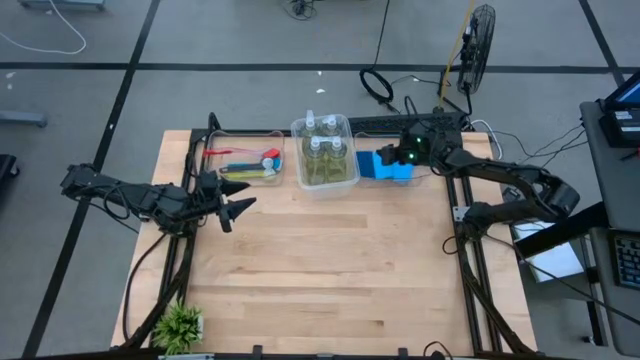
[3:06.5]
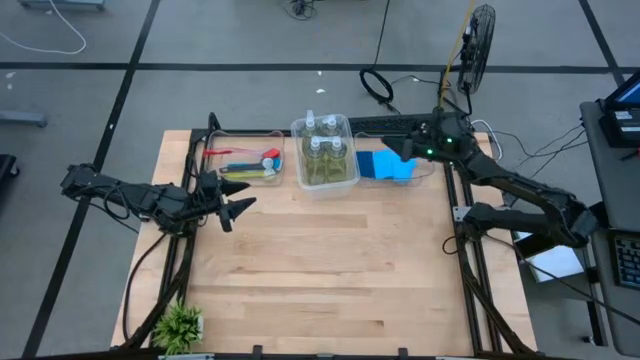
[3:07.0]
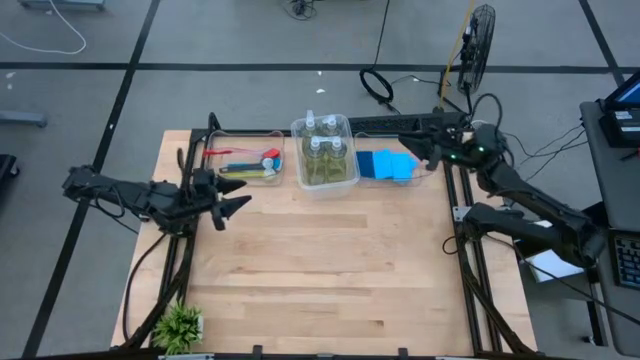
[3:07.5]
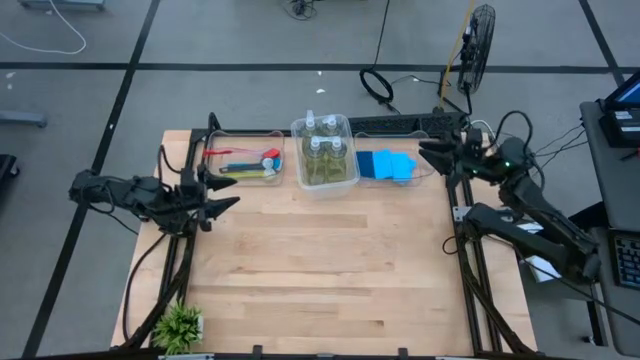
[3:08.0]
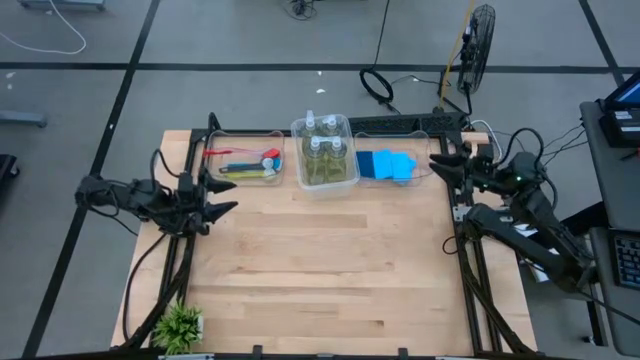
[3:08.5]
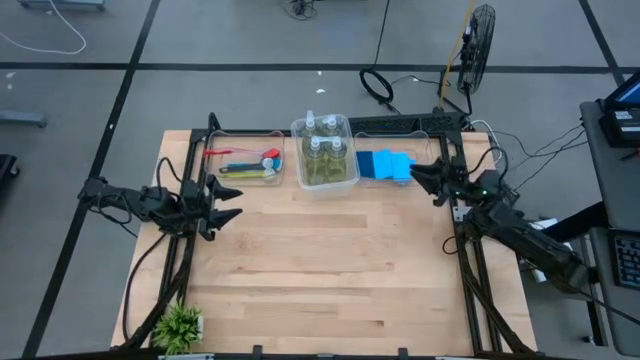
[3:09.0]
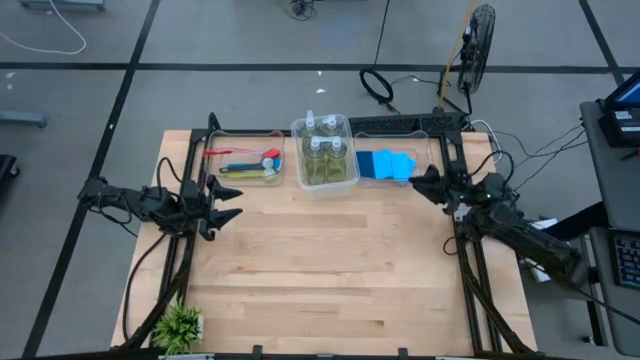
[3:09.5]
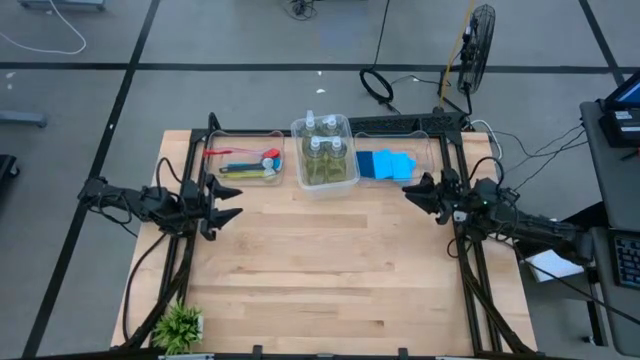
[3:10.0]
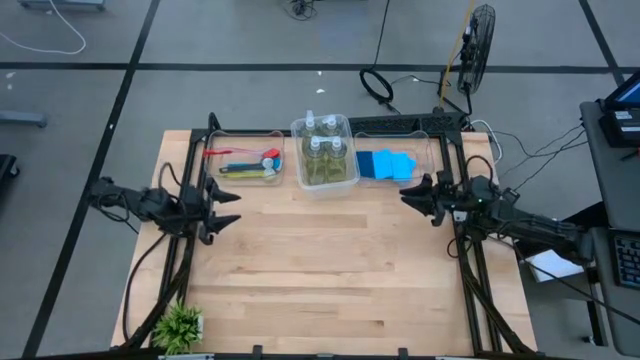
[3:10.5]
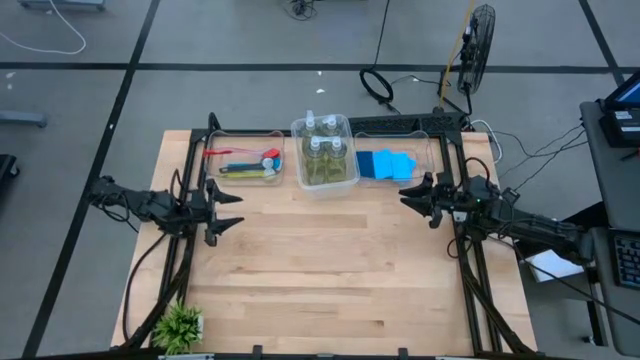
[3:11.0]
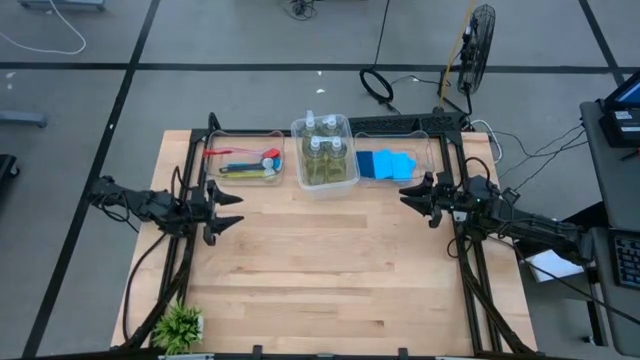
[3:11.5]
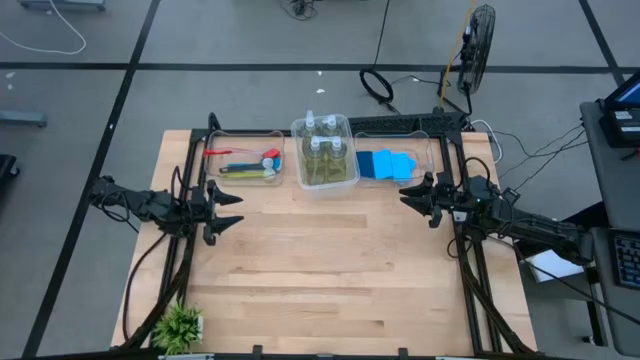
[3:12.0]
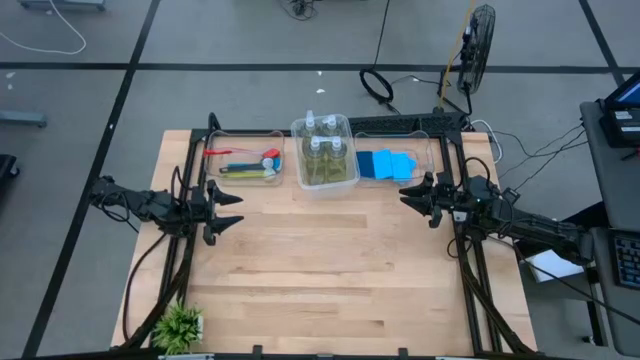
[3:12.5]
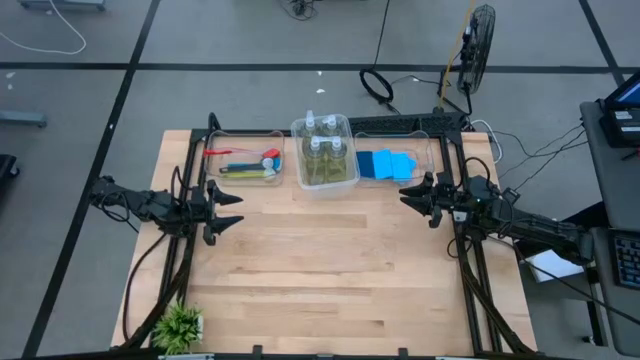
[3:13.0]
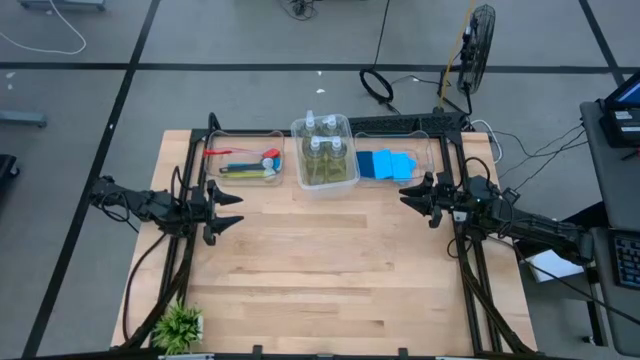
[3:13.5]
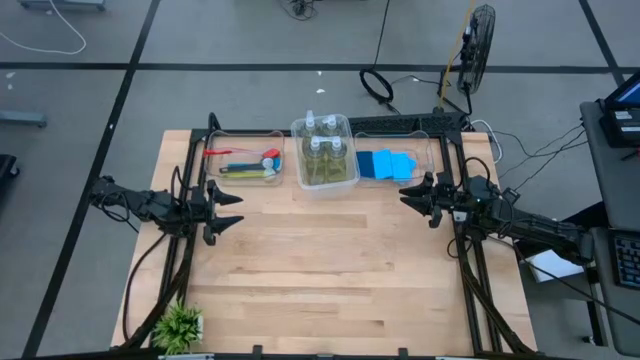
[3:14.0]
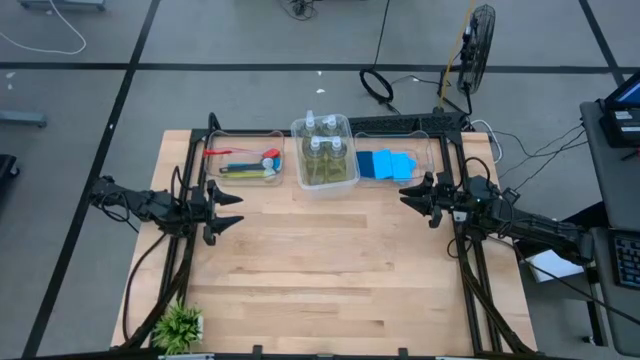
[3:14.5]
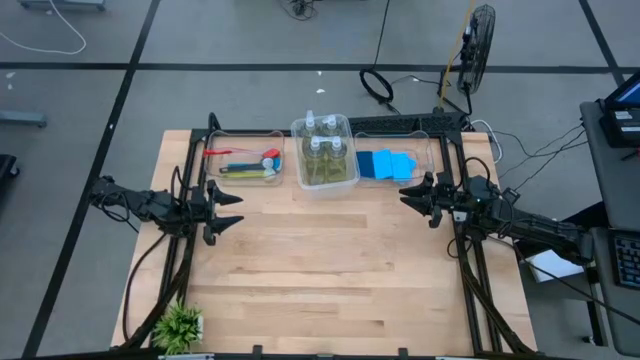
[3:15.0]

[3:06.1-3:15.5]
Task: Pick & Place Kitchen Sink Supplies
Return to Home Position

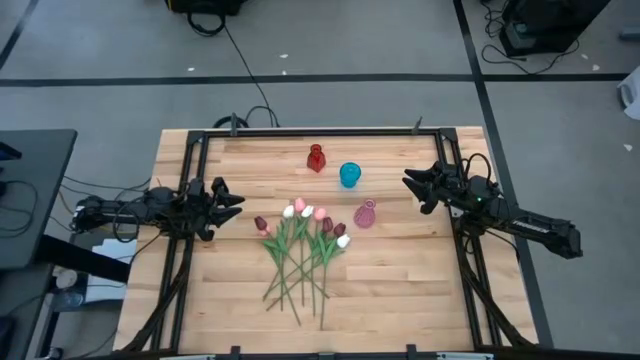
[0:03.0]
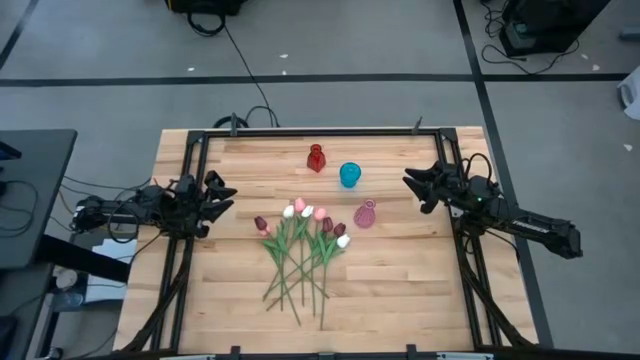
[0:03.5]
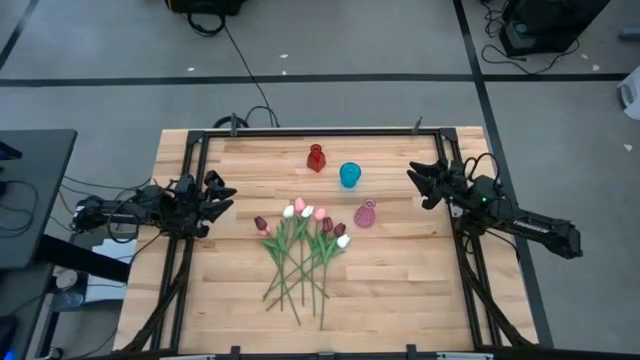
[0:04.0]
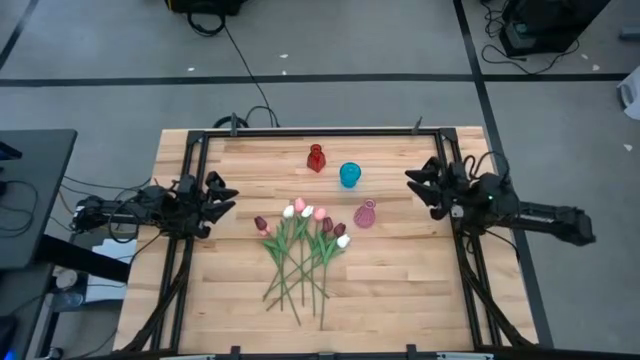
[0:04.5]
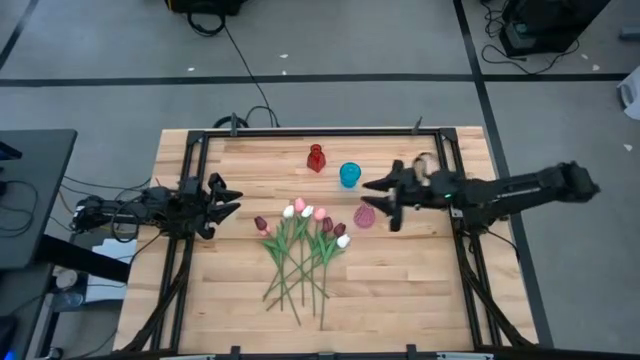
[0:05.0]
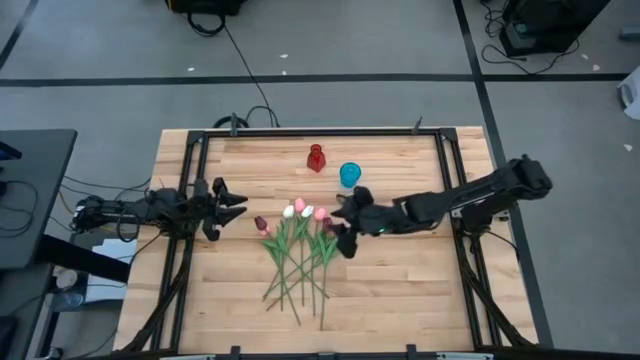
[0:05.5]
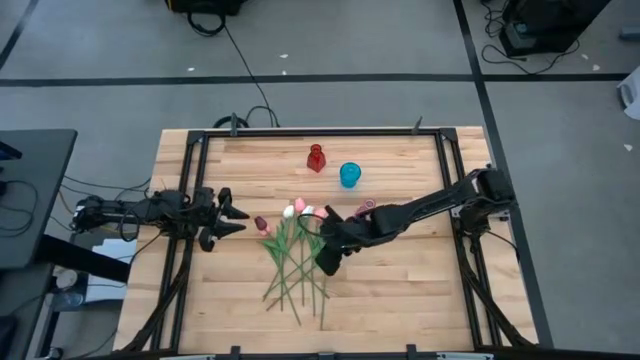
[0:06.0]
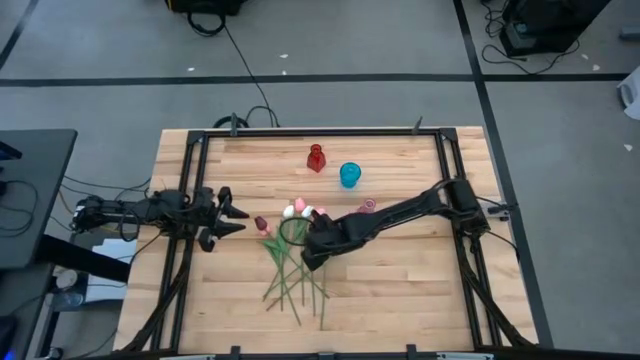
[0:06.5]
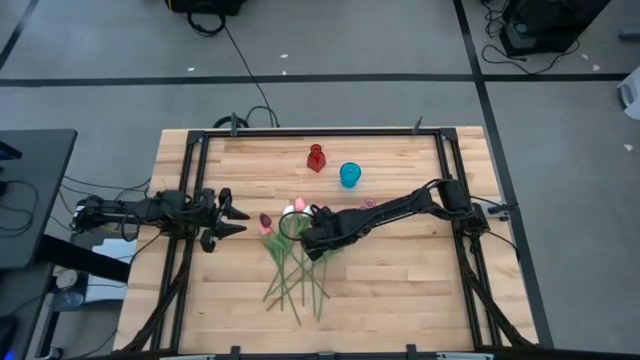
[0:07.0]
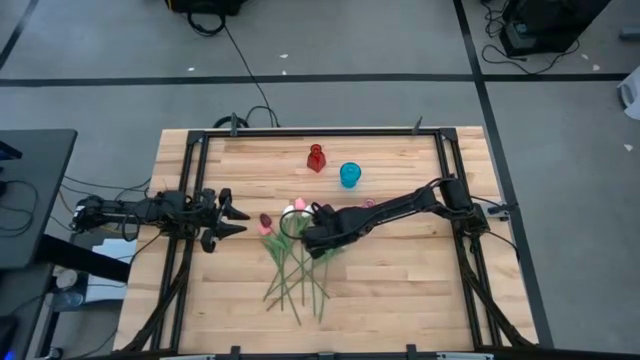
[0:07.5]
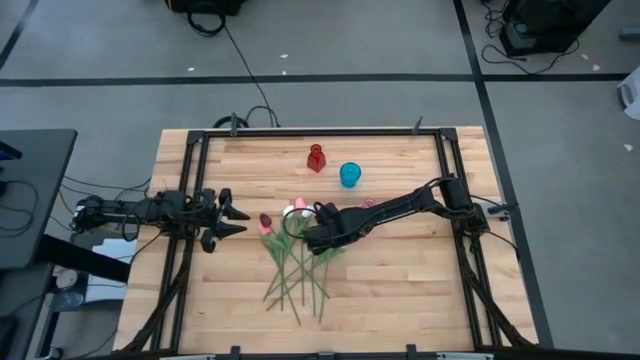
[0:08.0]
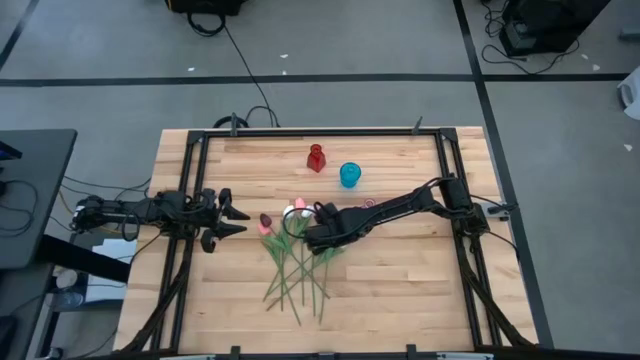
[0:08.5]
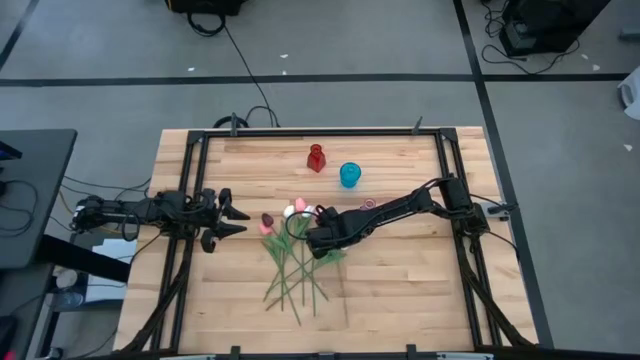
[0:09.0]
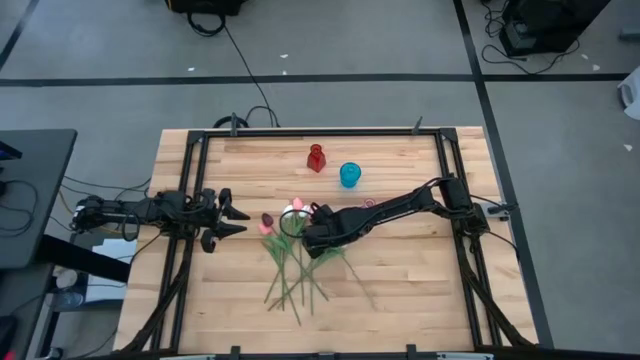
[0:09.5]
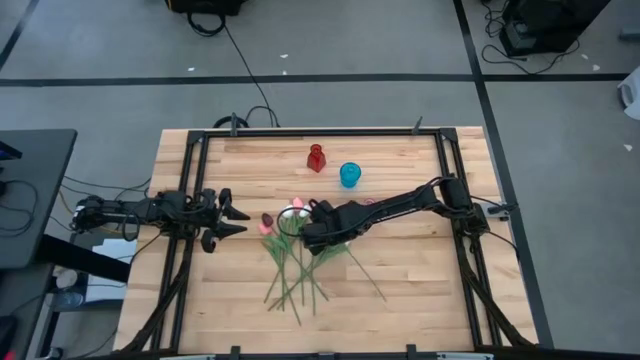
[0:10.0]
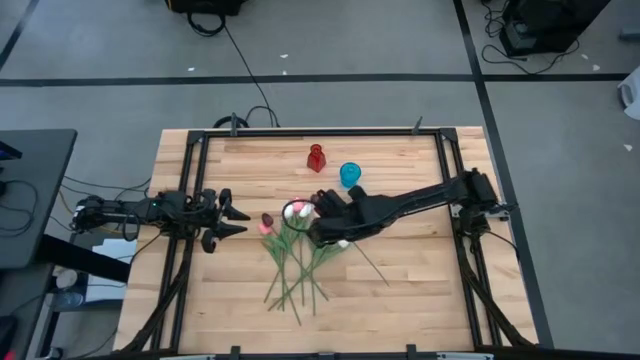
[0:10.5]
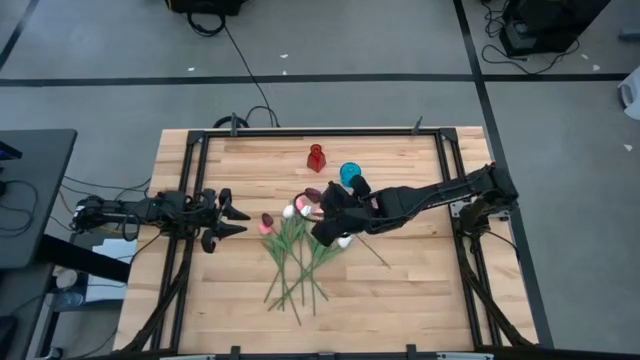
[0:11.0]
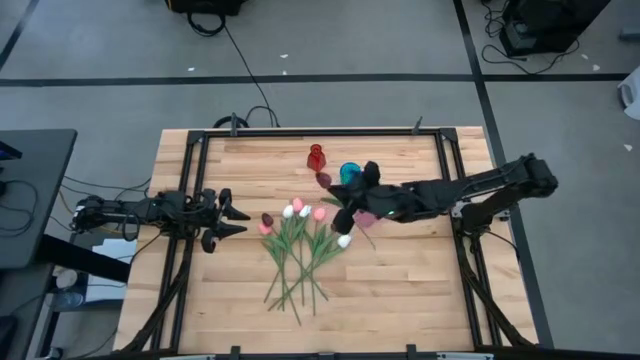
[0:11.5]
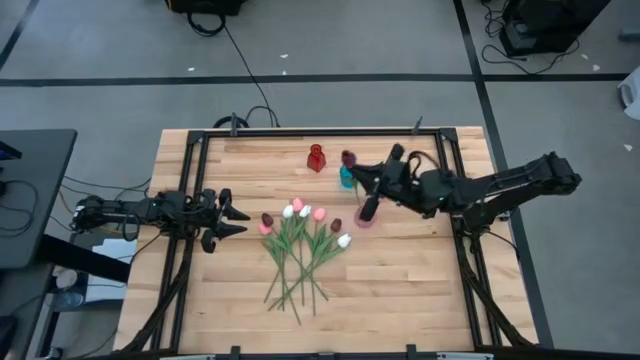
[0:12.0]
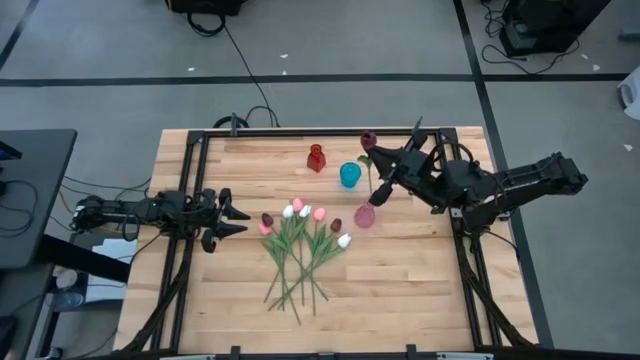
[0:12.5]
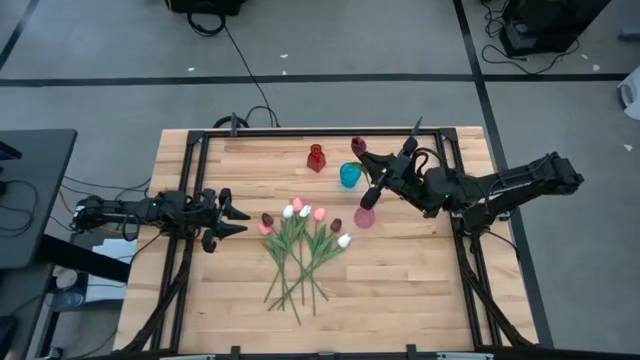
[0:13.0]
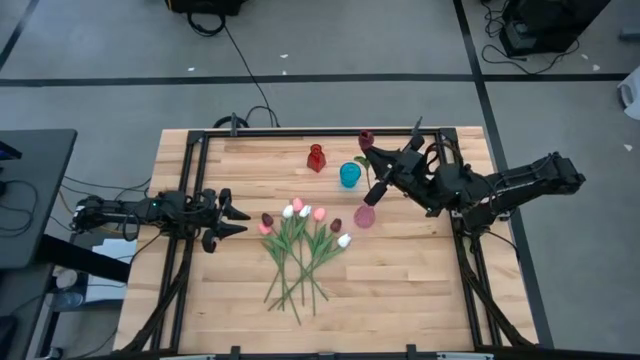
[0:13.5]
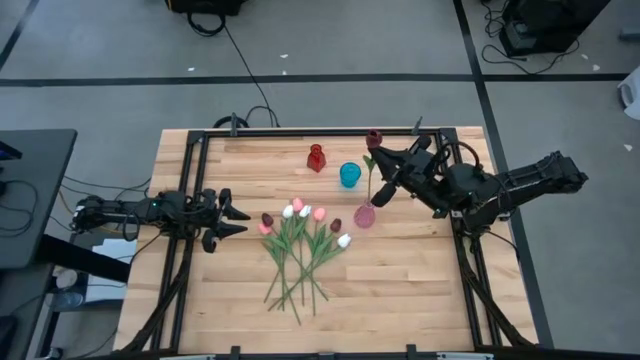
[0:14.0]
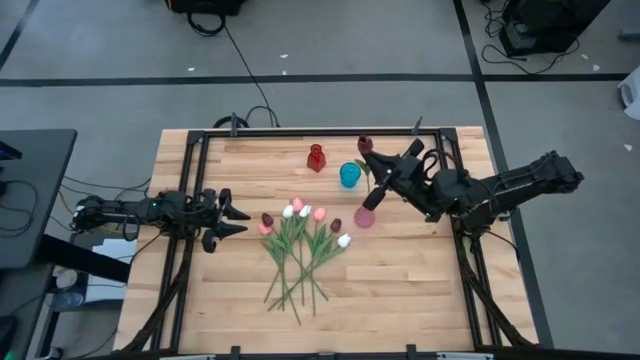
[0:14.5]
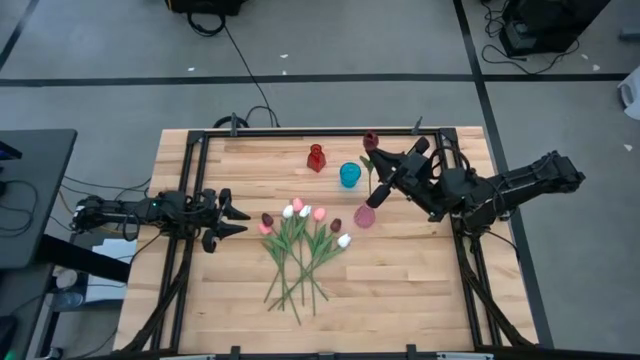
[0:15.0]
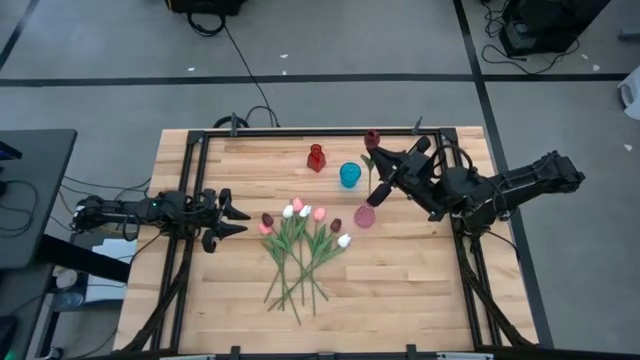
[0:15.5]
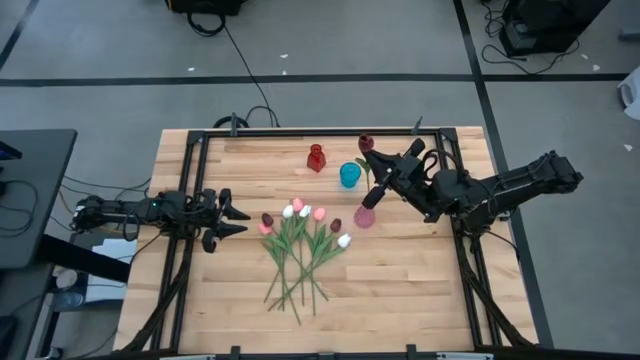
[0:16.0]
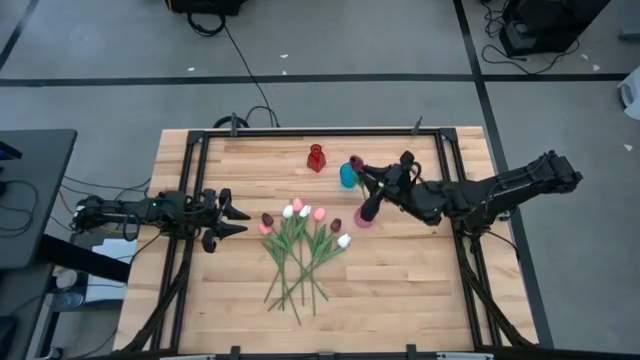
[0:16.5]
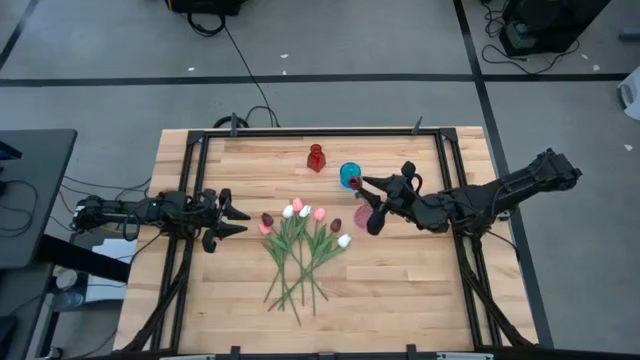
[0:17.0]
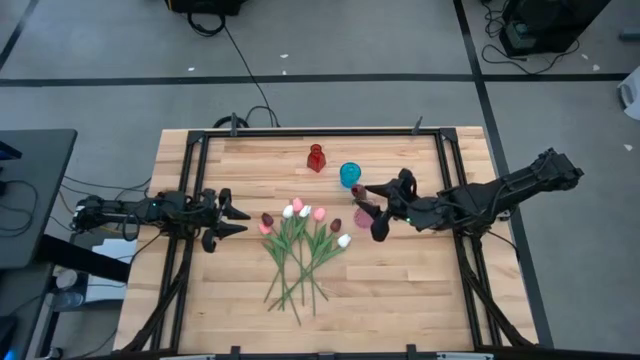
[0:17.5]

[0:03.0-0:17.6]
Task: Sort flowers into vase by color
Put the center red tulip into the pink vase
